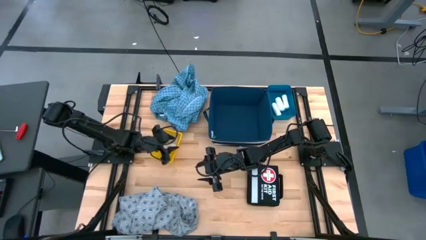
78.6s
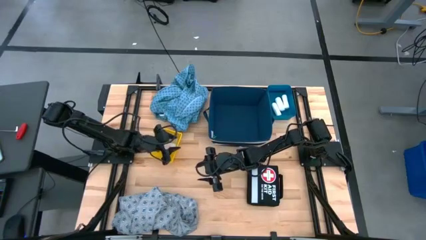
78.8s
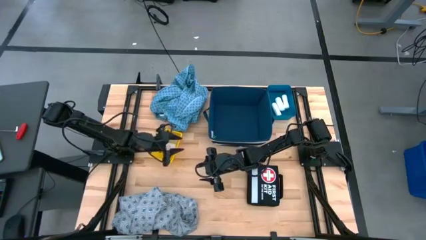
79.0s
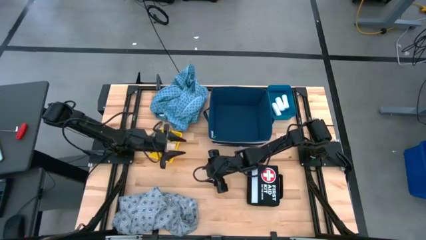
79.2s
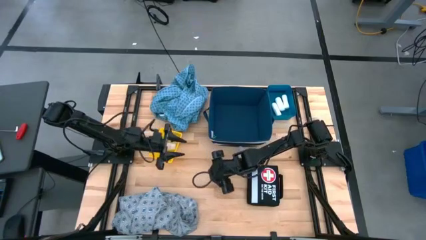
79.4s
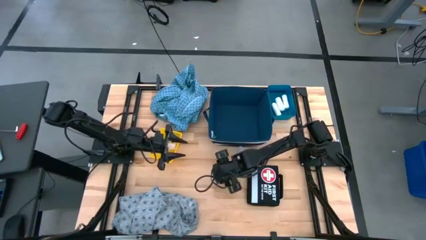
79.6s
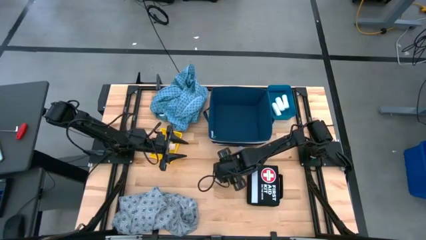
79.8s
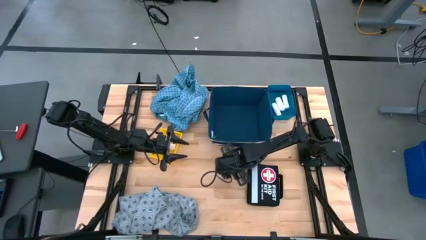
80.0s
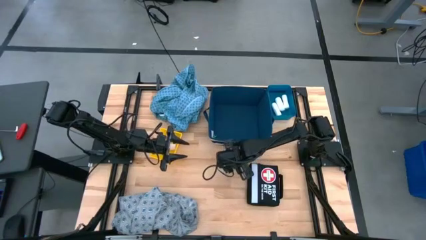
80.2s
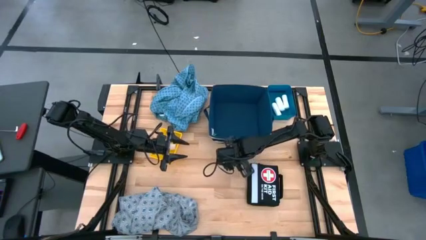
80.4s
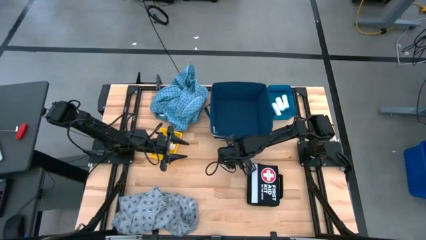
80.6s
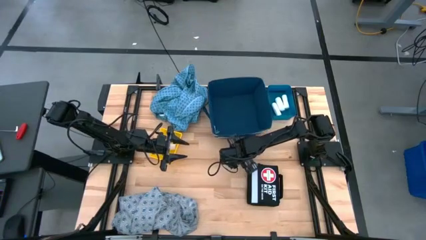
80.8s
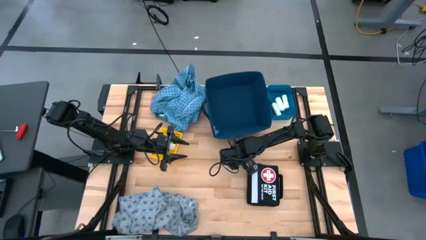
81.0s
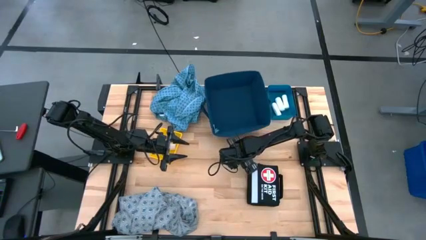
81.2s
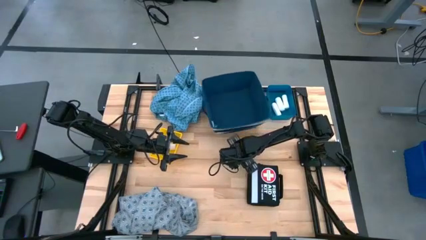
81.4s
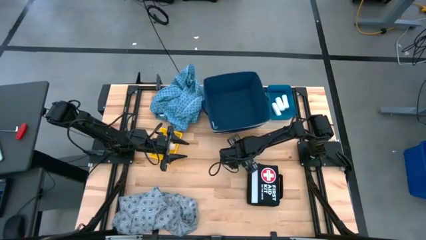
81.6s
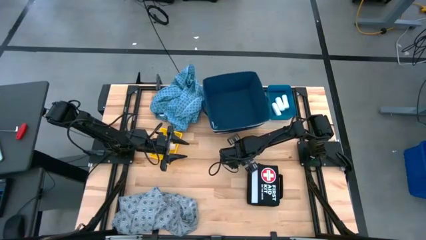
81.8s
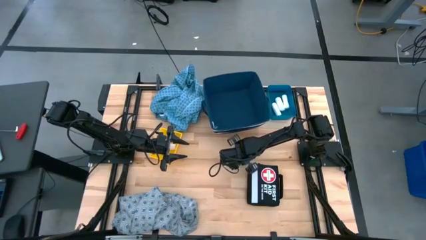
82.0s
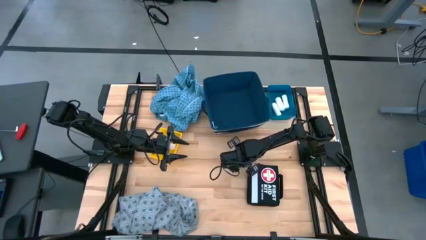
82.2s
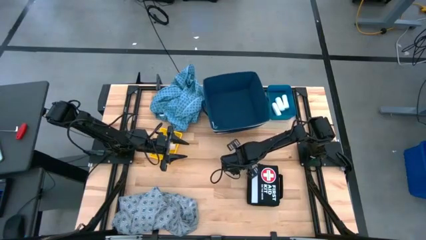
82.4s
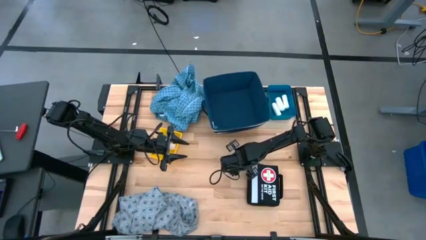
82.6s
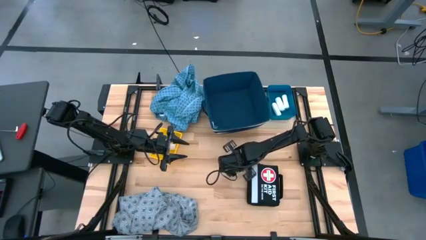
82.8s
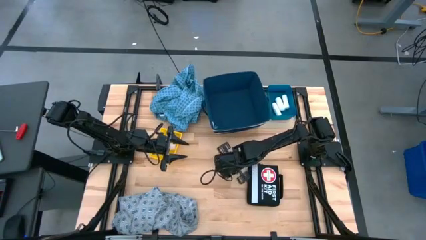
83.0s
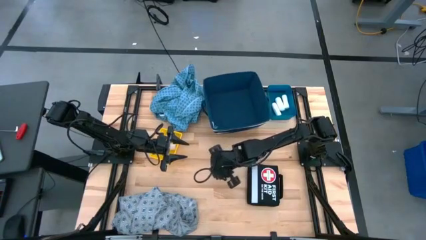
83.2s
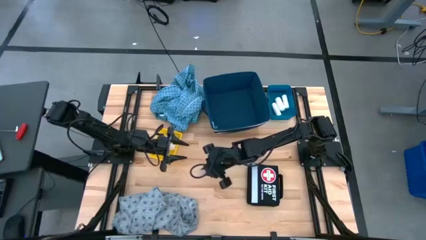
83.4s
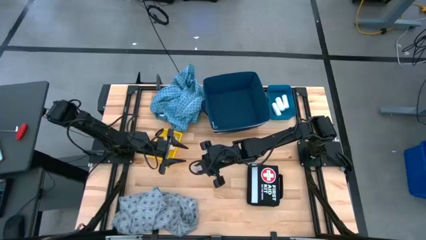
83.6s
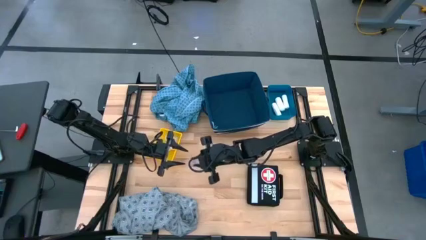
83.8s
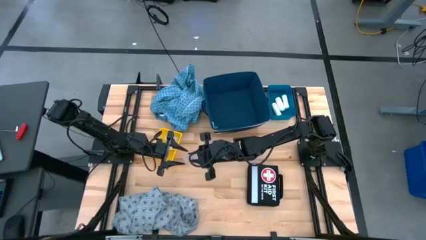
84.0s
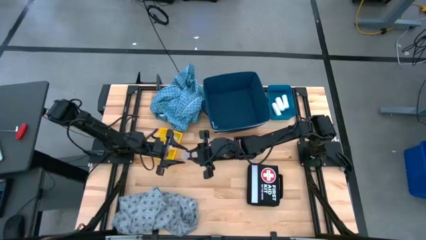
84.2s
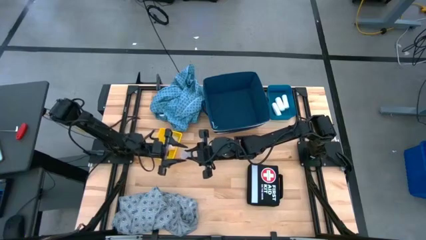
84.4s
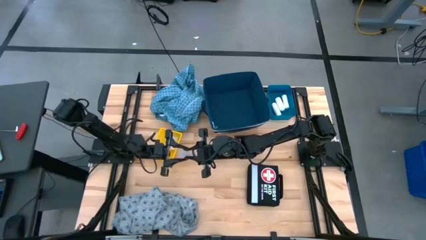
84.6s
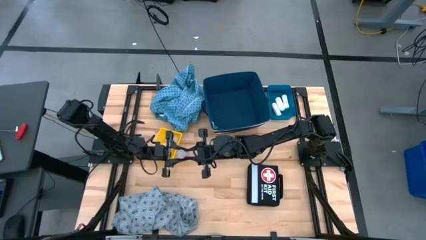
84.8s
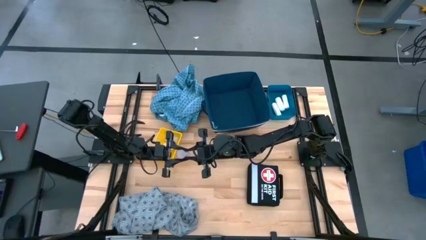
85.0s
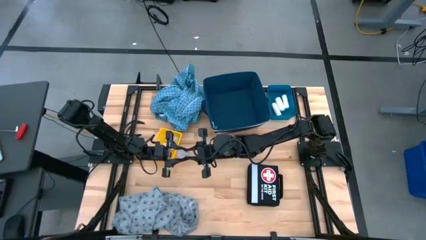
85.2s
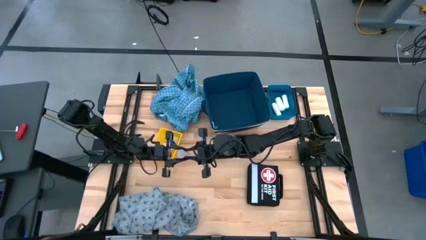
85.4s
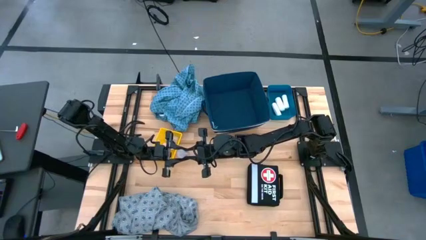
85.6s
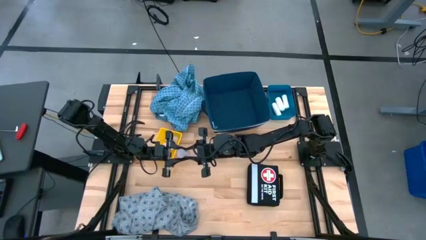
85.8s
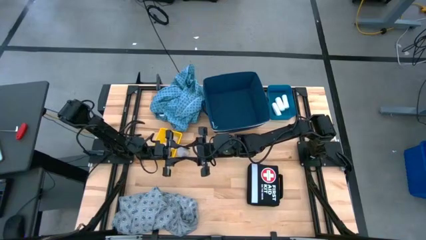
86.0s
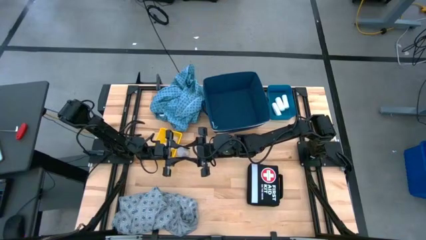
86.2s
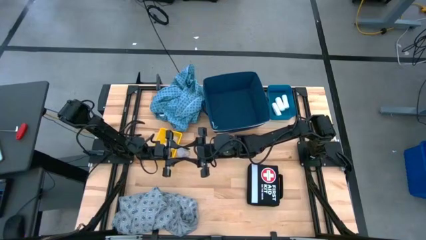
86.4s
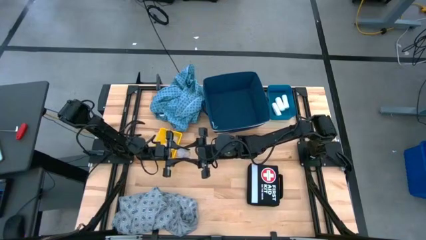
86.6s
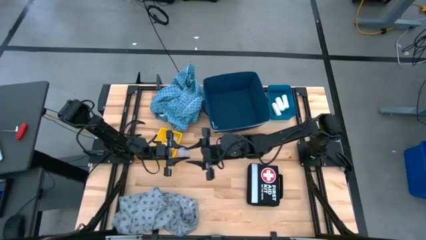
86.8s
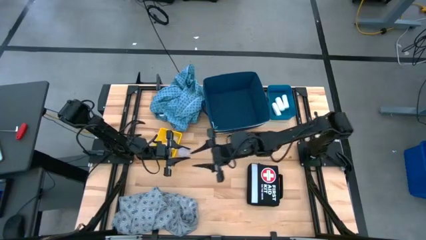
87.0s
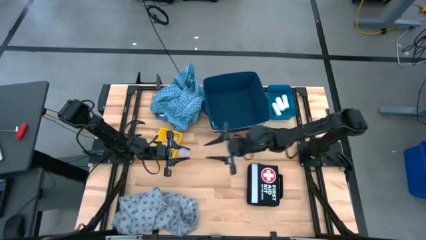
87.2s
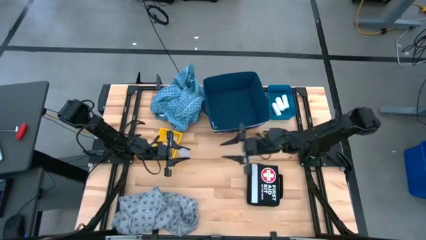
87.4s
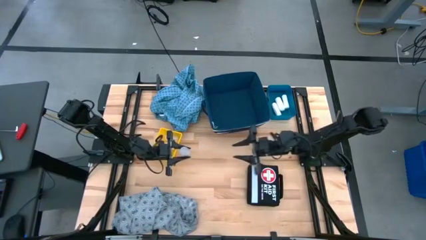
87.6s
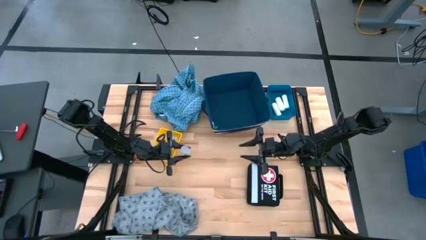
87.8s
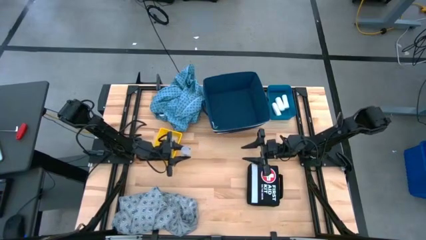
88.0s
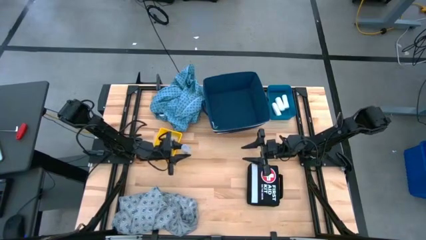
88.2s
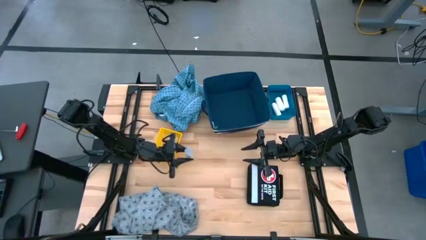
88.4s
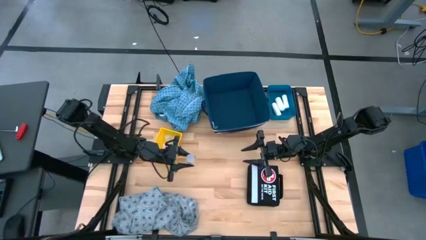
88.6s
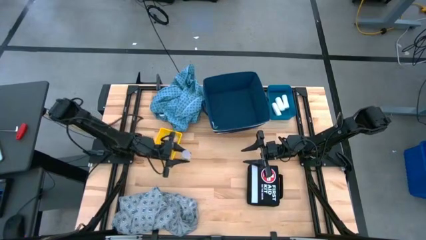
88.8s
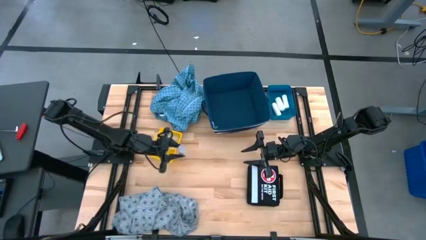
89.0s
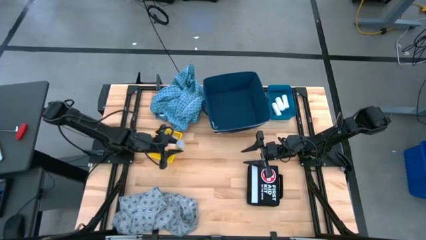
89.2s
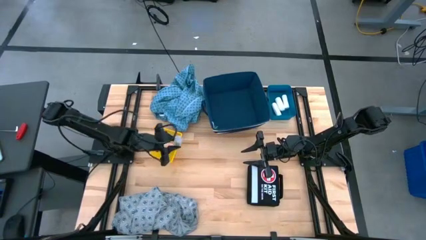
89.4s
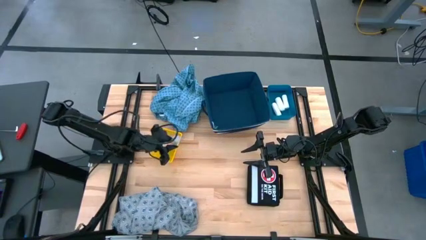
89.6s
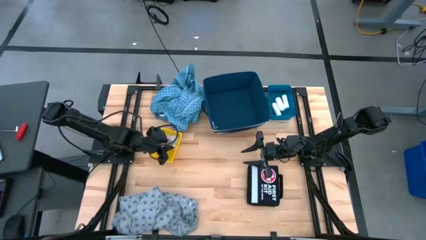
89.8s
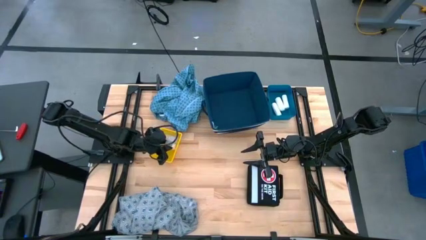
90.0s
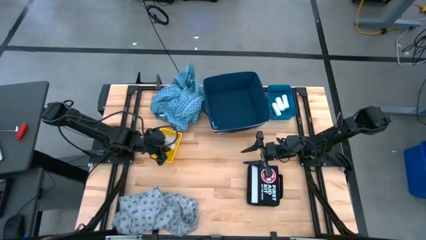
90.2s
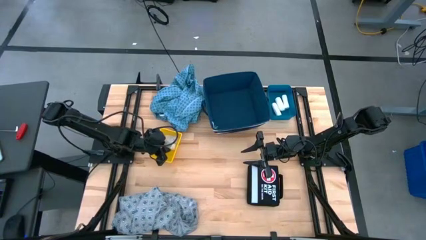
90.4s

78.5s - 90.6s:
Task: Pick & place medical supplies in basket/bin
Put the transparent pill bottle into the yellow bin

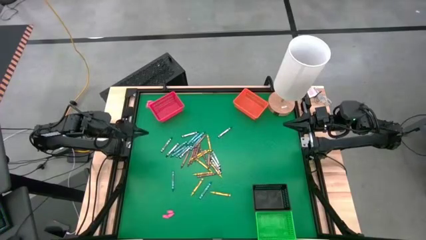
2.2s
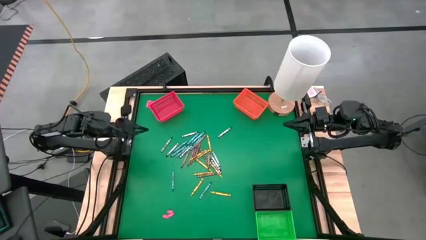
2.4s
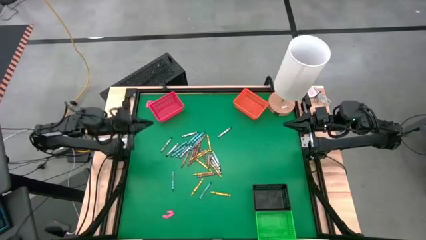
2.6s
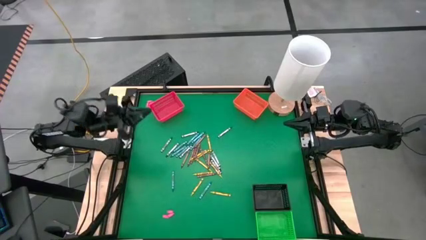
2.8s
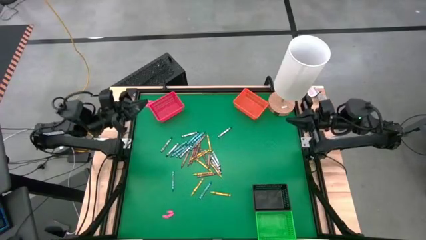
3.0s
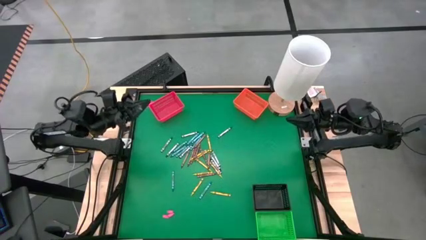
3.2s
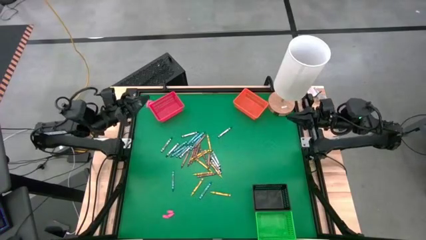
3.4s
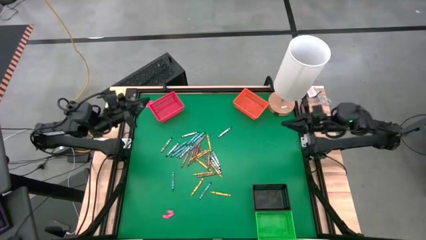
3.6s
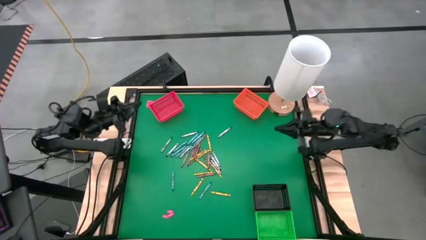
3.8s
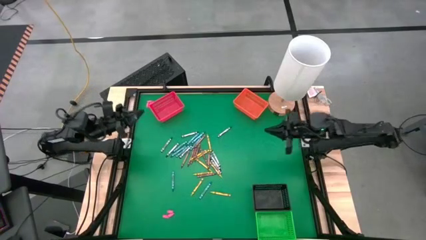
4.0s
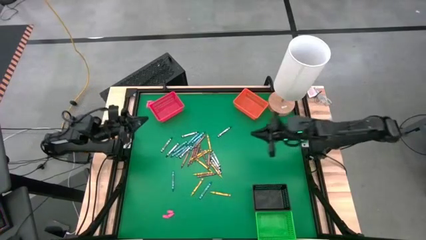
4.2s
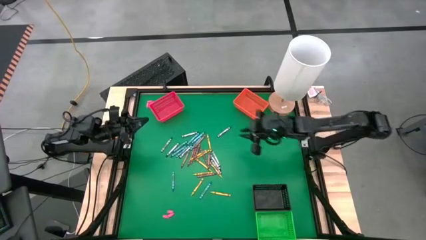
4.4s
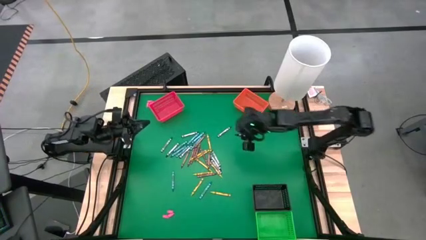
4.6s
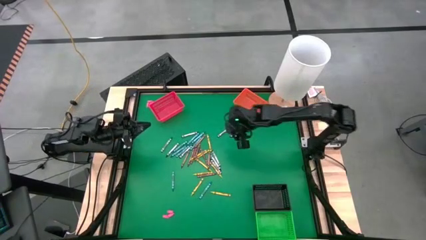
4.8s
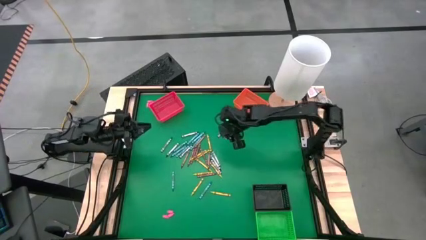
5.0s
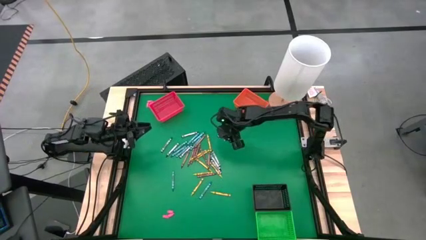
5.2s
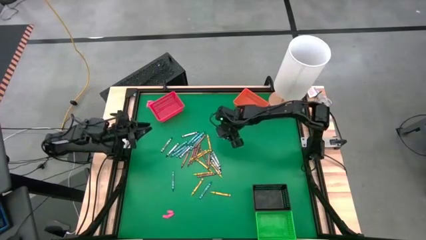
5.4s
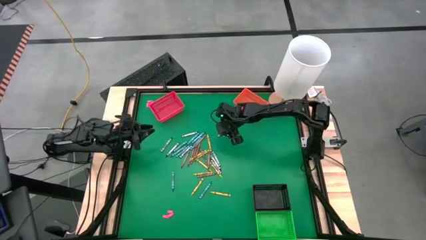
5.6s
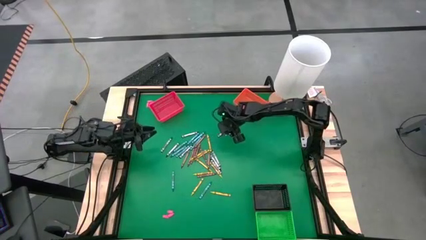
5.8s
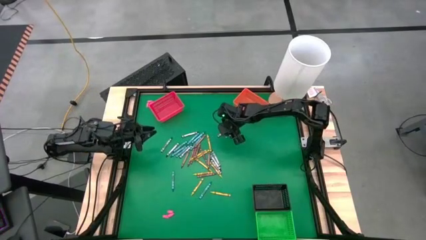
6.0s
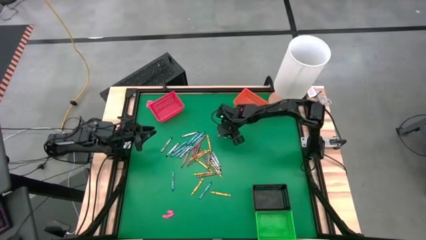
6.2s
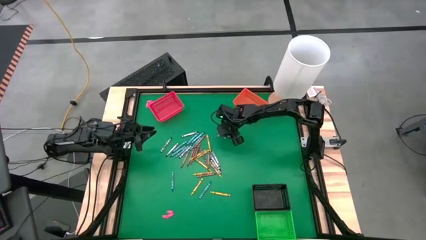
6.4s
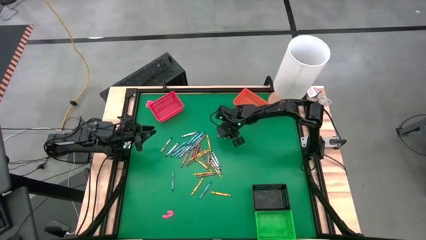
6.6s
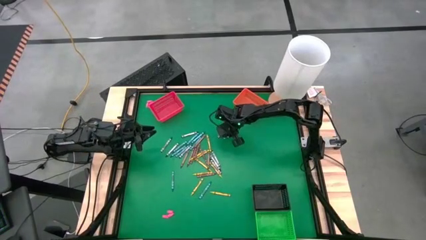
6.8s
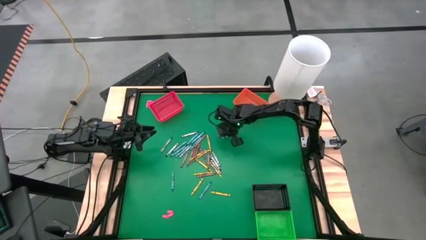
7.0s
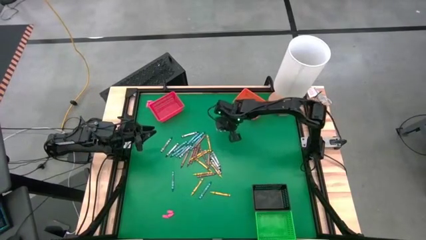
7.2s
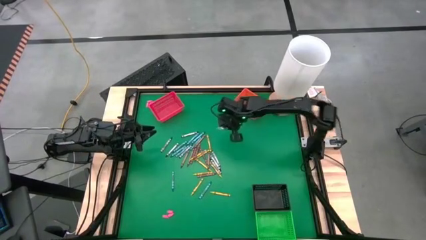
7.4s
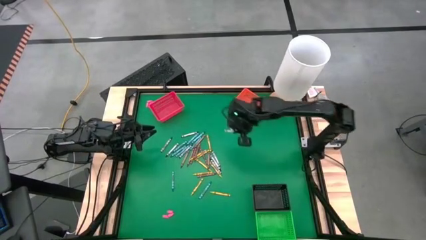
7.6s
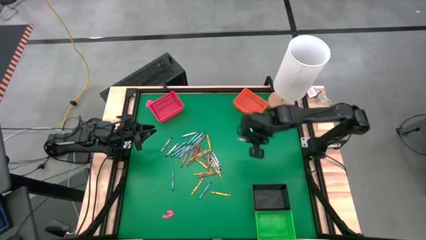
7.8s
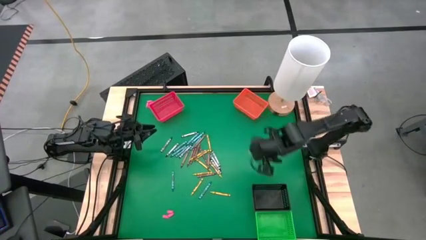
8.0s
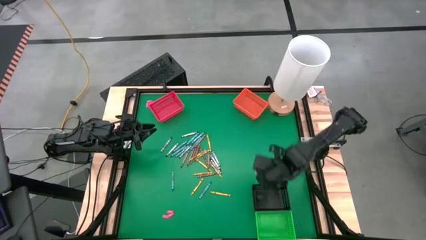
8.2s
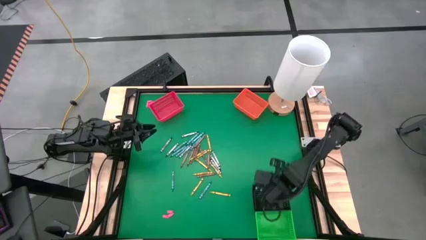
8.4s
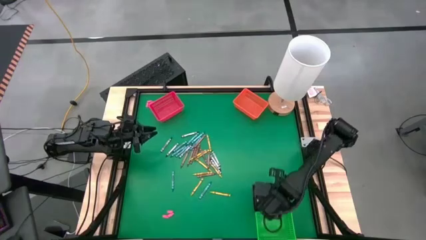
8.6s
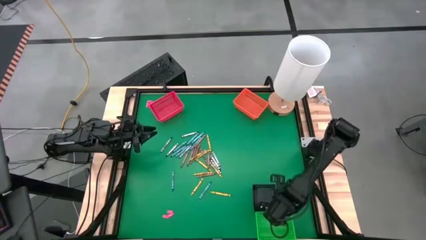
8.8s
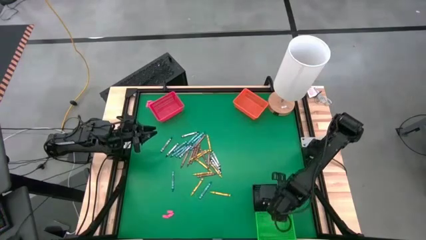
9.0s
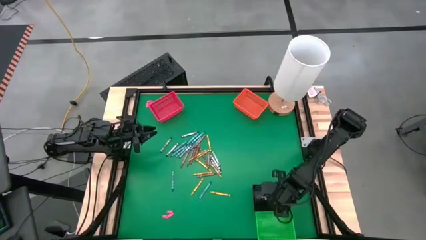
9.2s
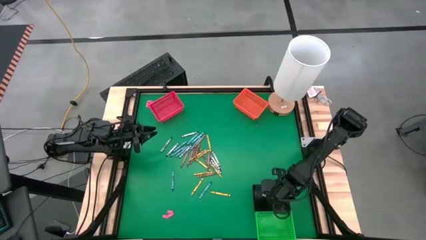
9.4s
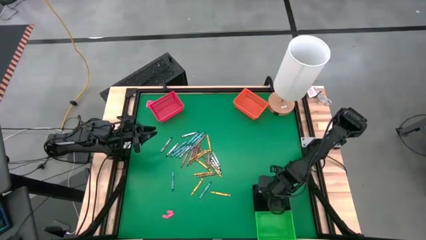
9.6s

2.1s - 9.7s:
Task: Sort crayons
Put the black crayon into the black bin
